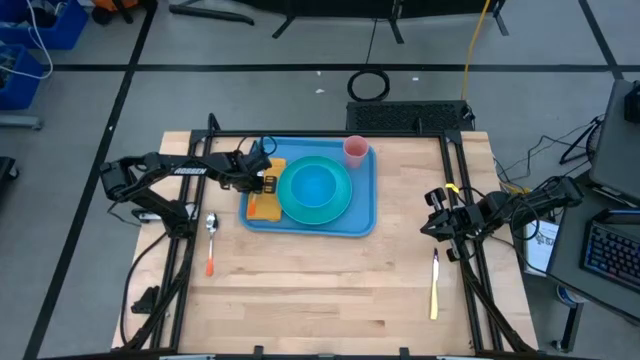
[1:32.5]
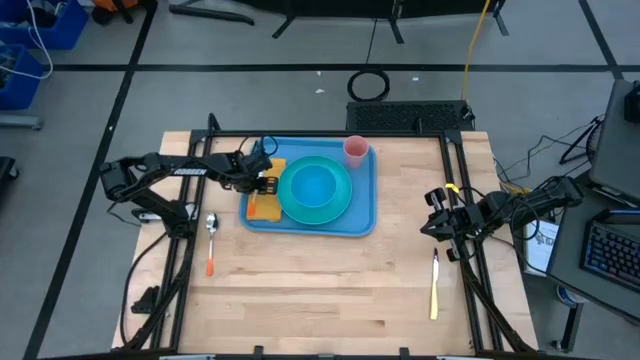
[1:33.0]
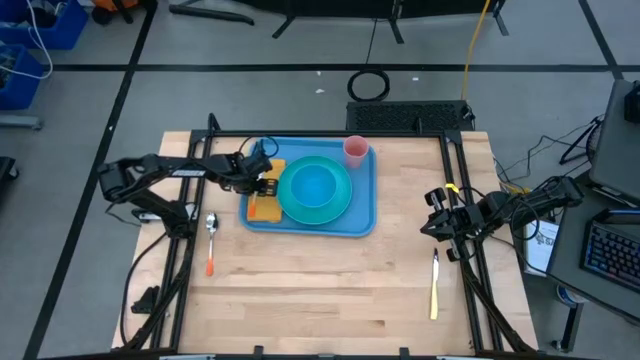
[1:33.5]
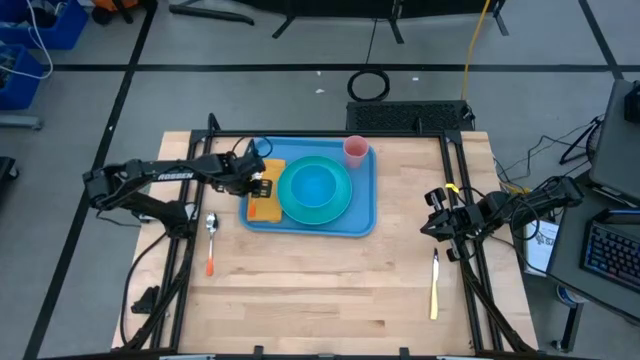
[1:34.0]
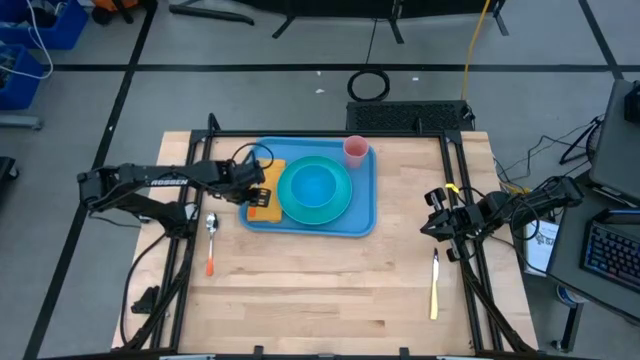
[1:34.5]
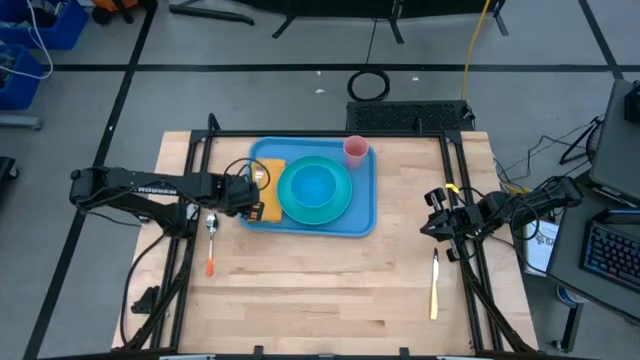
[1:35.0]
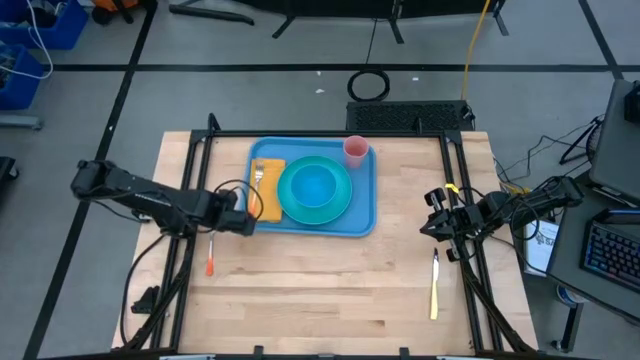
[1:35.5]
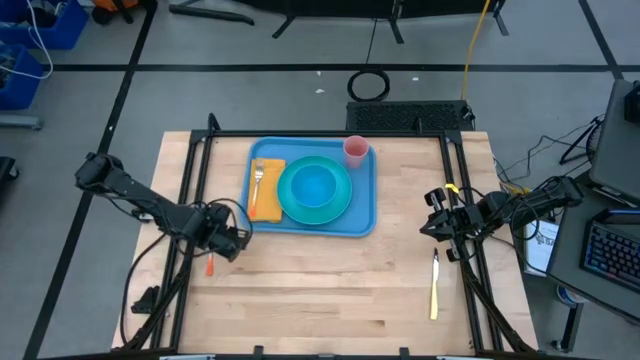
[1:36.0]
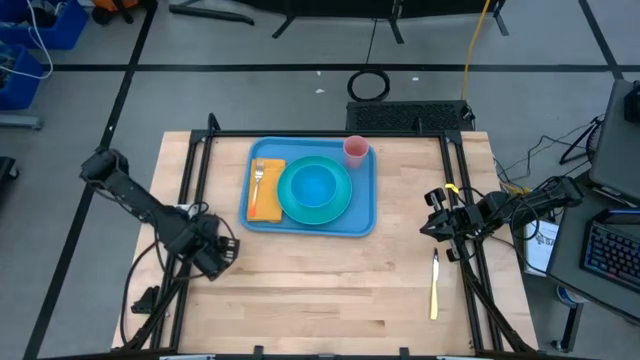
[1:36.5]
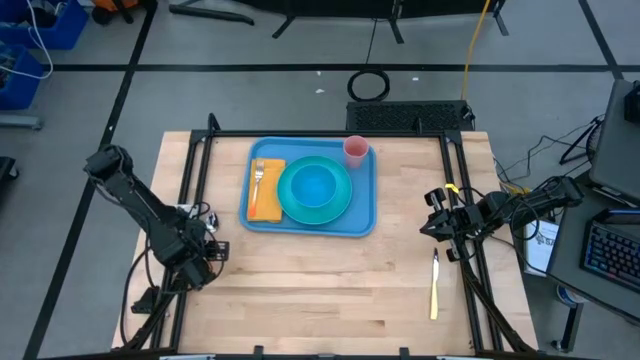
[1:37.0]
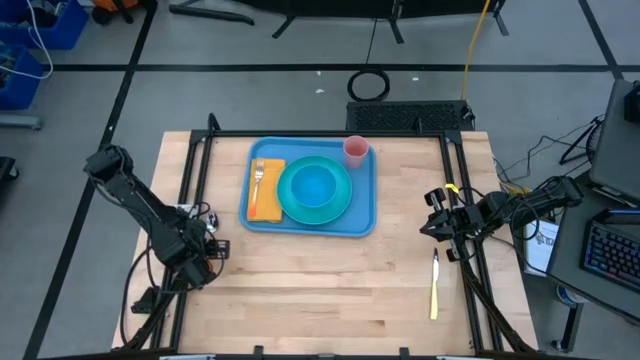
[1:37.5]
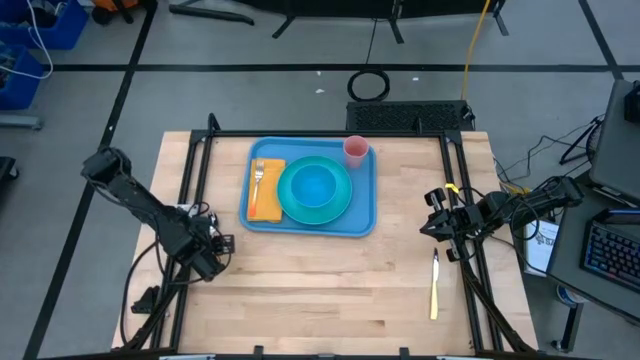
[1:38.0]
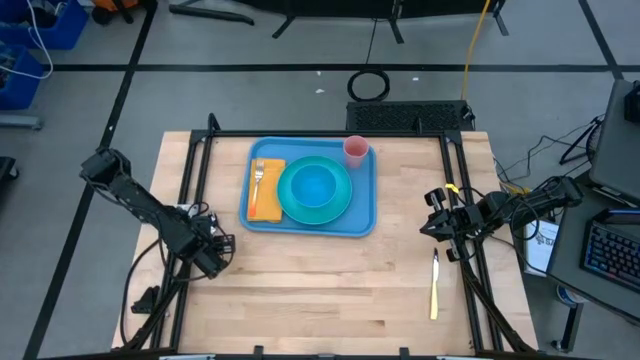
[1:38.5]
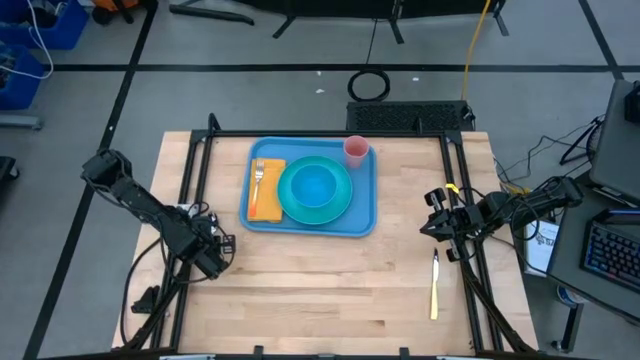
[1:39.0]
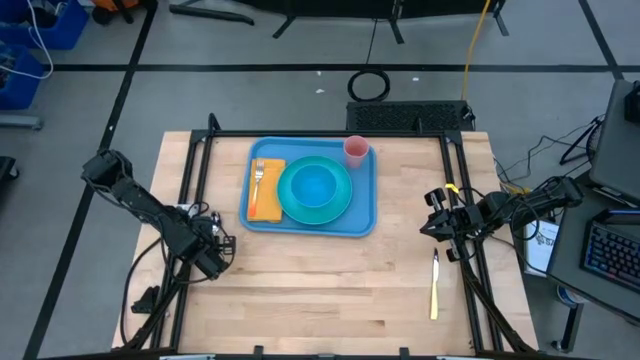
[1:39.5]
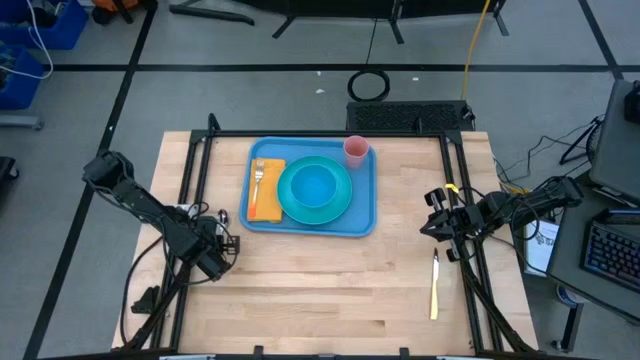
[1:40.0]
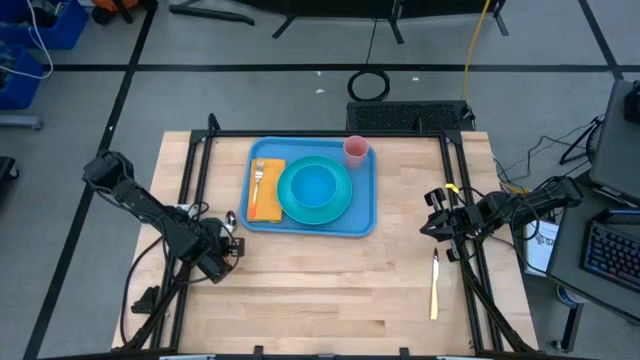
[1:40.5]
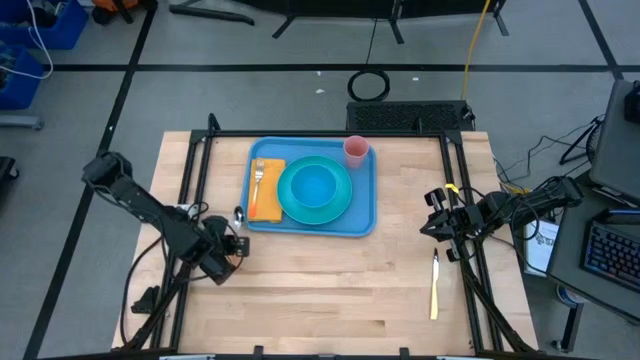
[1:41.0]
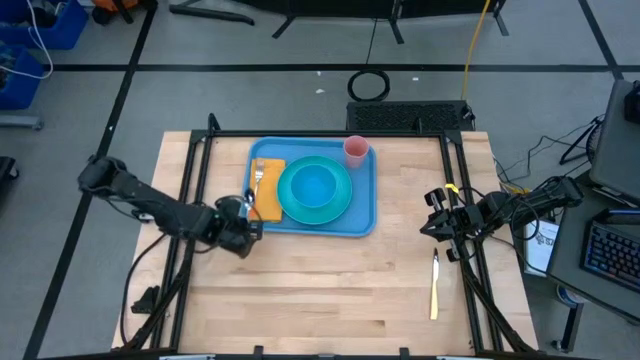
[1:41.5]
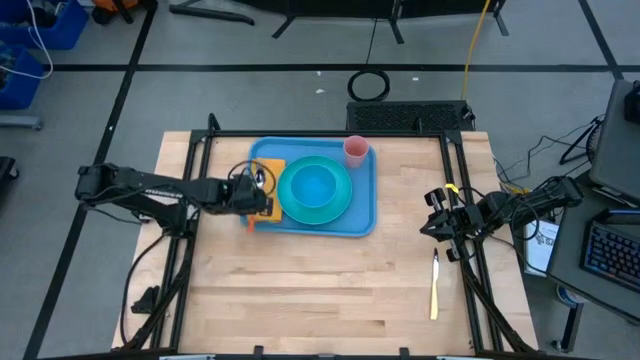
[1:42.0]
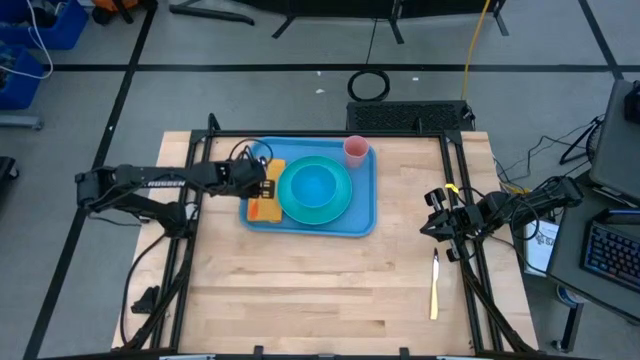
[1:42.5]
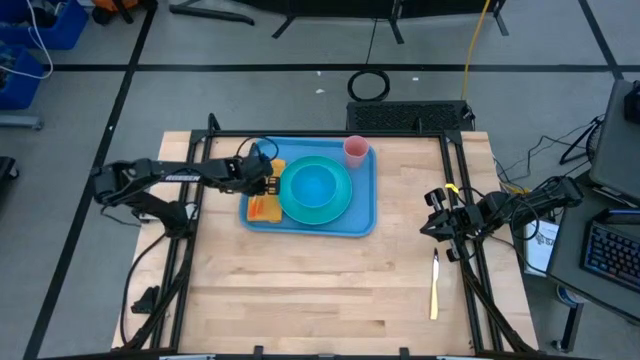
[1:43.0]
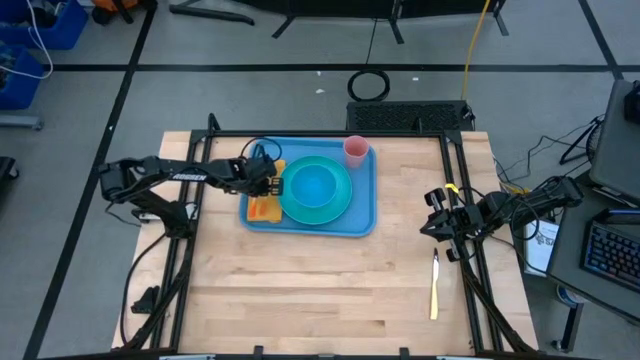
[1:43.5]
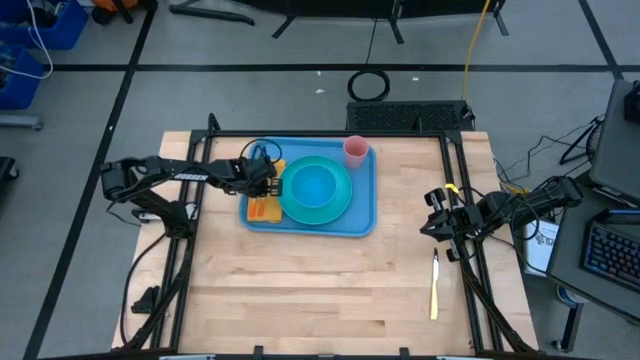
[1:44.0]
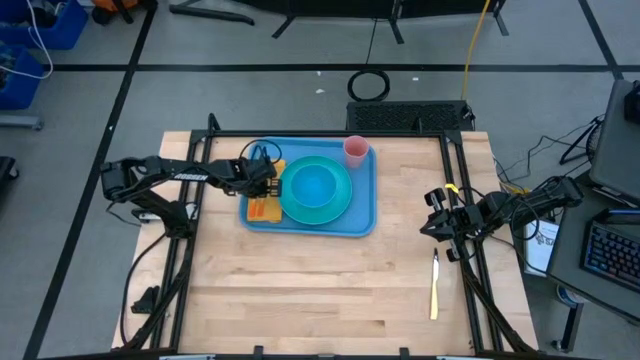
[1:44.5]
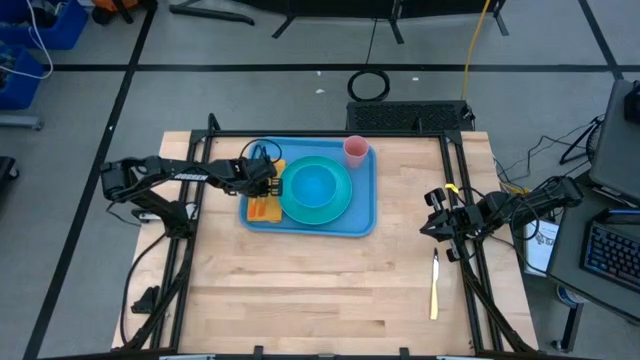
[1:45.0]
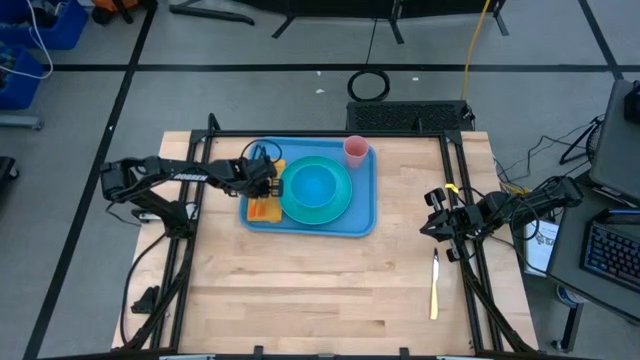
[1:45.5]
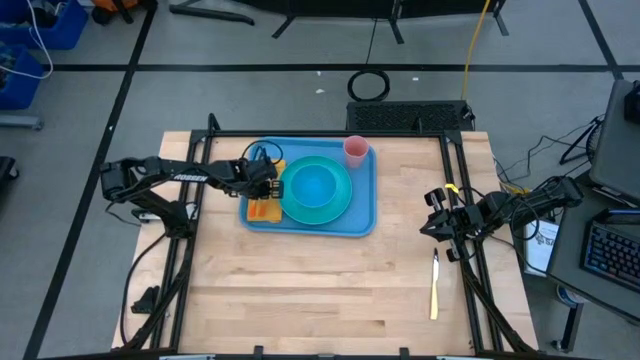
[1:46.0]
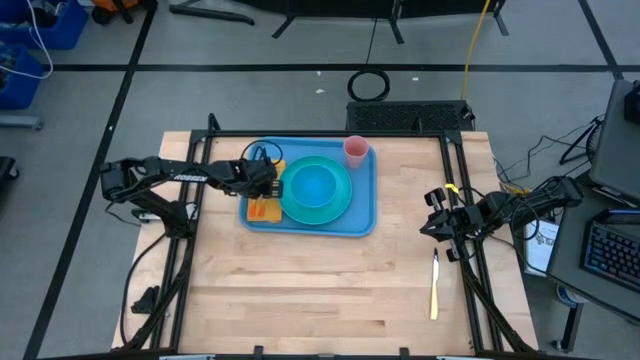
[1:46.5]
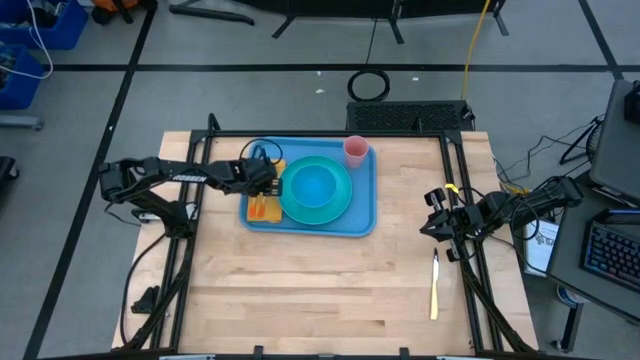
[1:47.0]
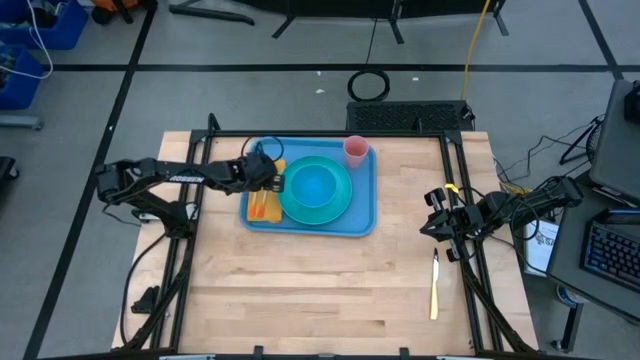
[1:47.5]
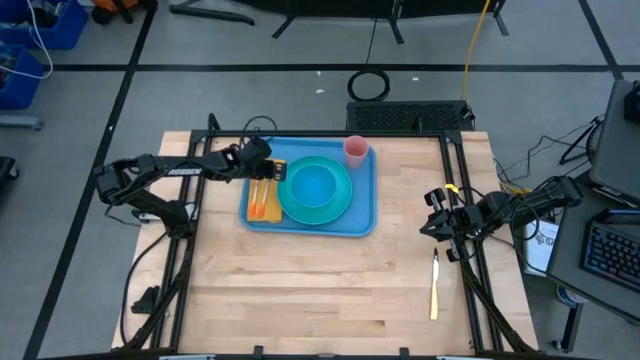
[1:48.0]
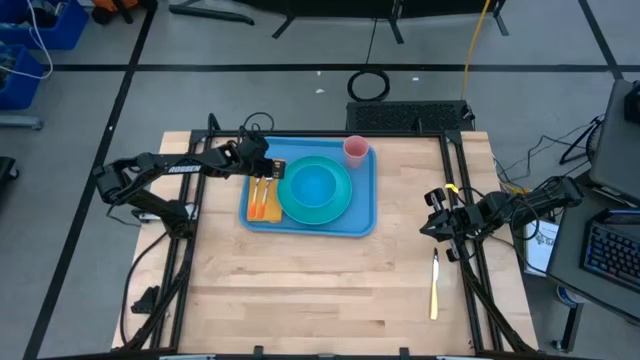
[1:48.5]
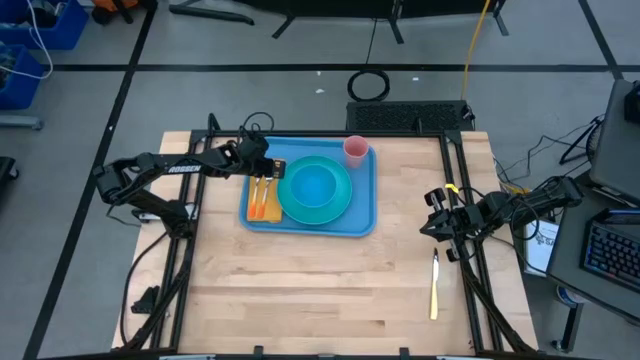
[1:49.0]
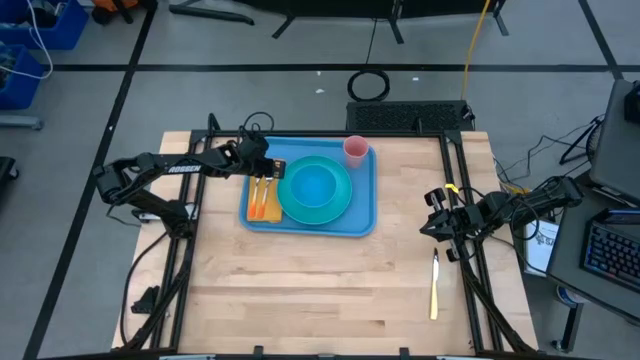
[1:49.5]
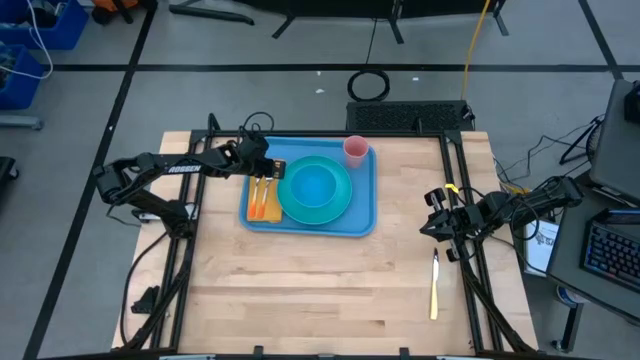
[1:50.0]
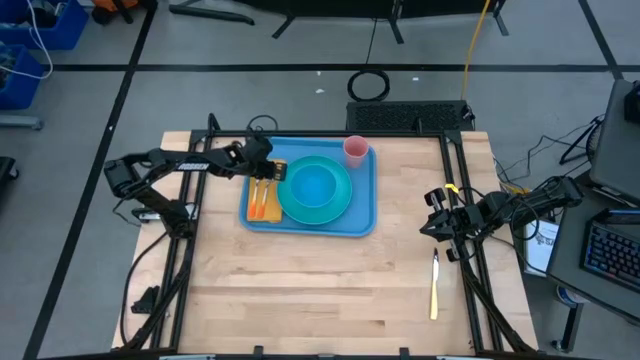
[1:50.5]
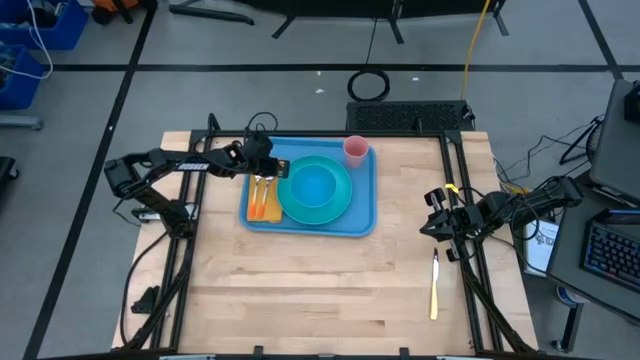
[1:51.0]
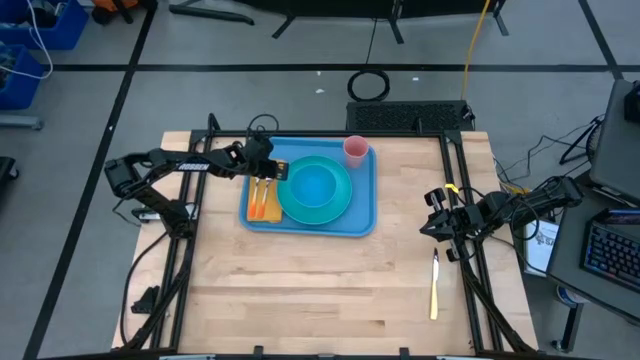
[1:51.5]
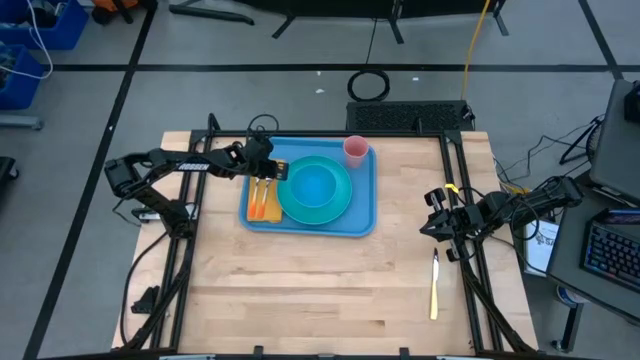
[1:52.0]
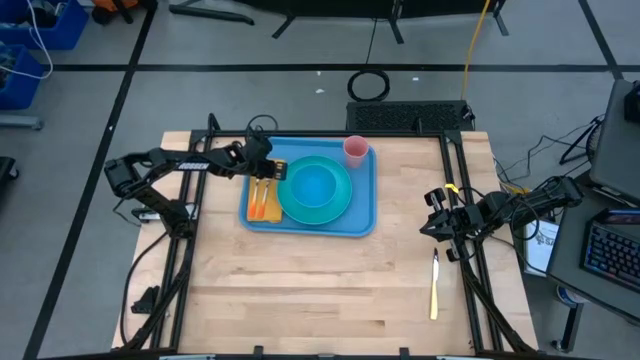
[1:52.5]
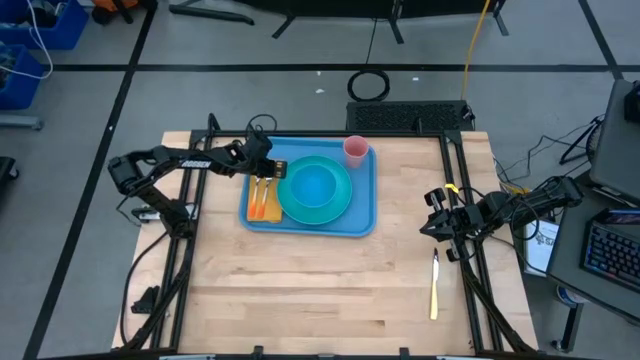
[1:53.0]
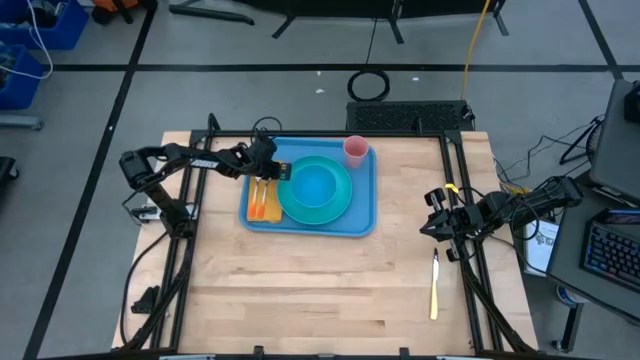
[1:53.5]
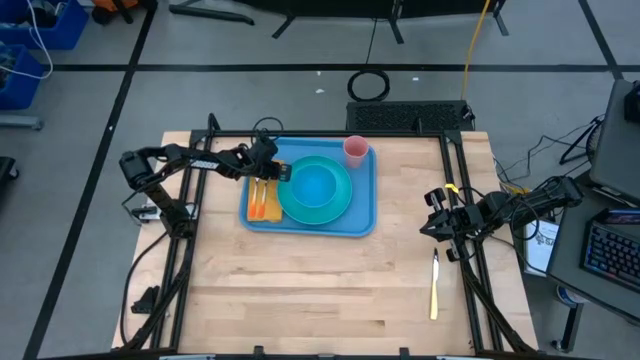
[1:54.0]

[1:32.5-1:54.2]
Task: Set up tray
Put the orange spoon on the yellow napkin to the right of the orange fork
